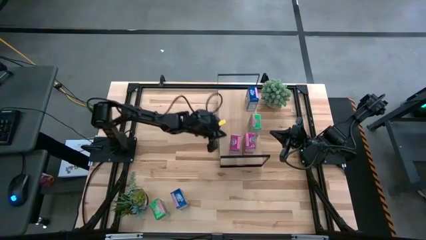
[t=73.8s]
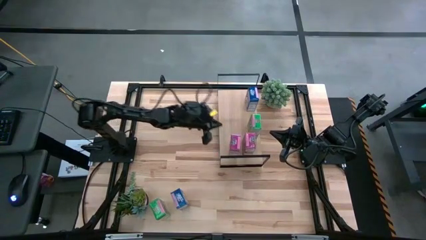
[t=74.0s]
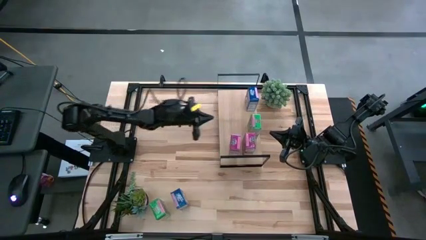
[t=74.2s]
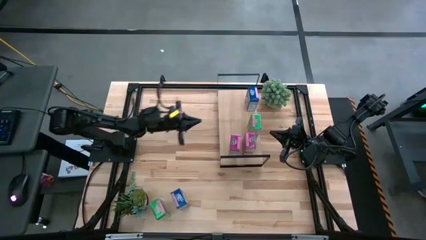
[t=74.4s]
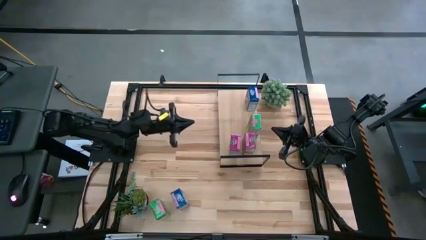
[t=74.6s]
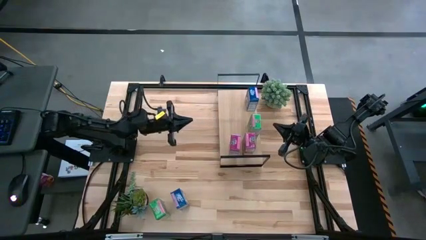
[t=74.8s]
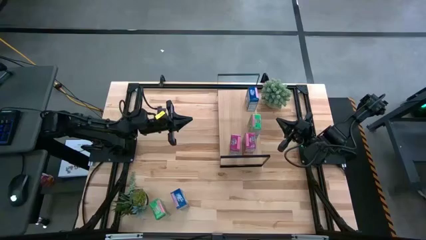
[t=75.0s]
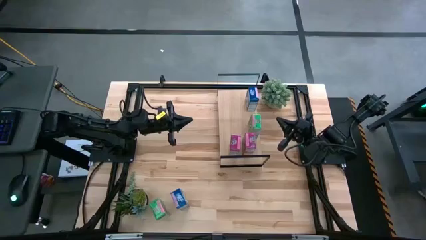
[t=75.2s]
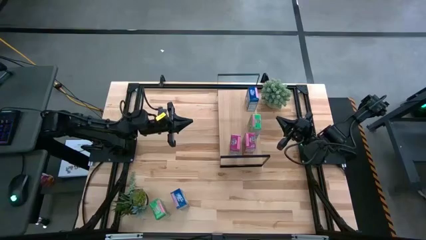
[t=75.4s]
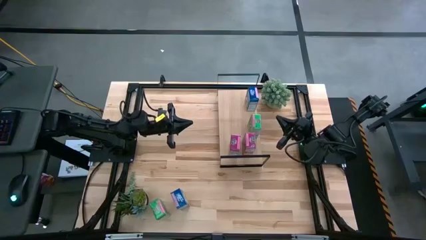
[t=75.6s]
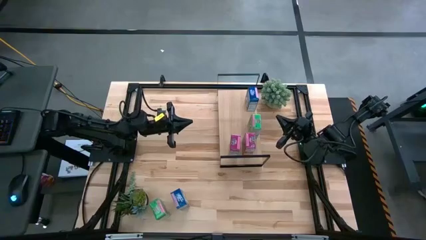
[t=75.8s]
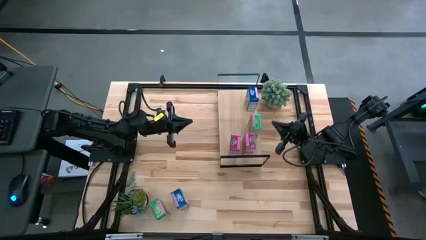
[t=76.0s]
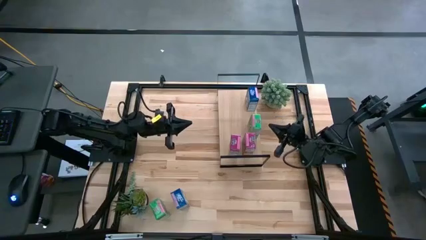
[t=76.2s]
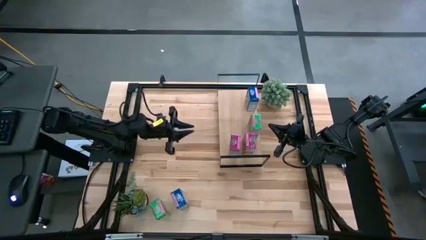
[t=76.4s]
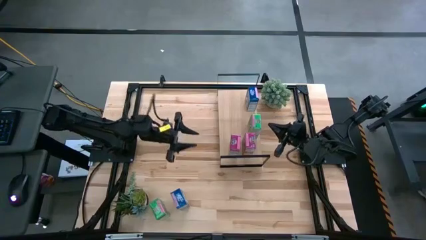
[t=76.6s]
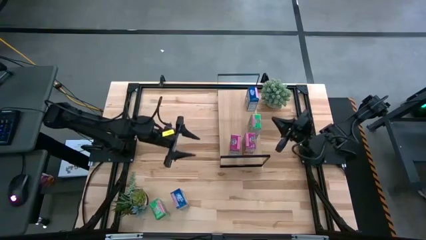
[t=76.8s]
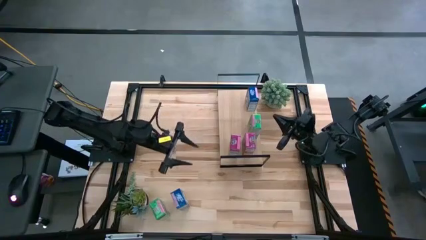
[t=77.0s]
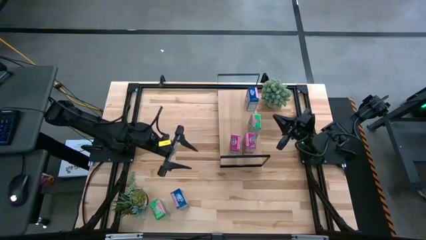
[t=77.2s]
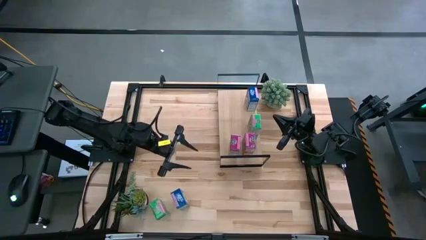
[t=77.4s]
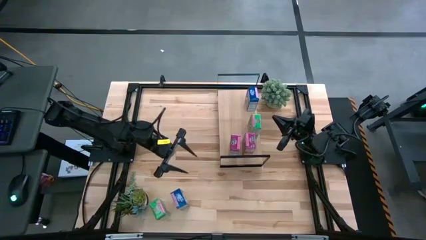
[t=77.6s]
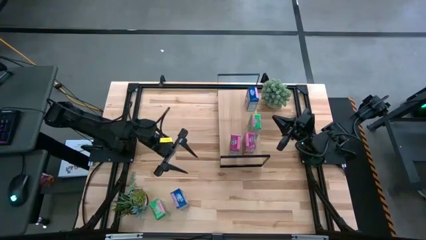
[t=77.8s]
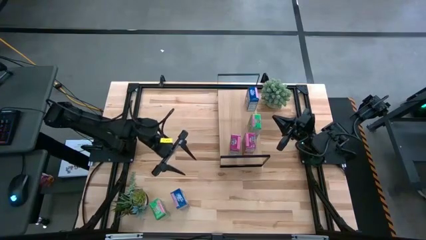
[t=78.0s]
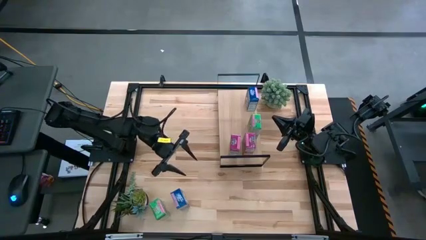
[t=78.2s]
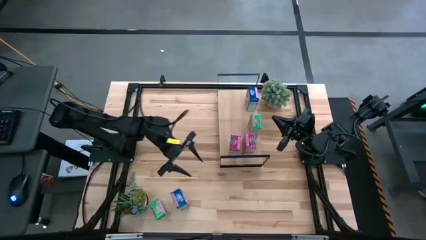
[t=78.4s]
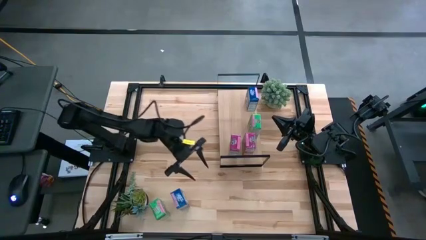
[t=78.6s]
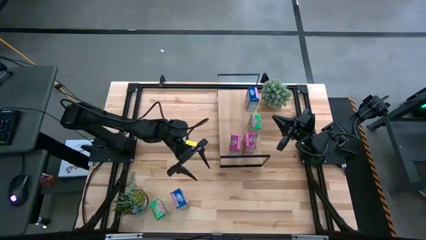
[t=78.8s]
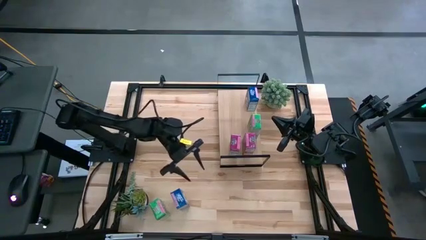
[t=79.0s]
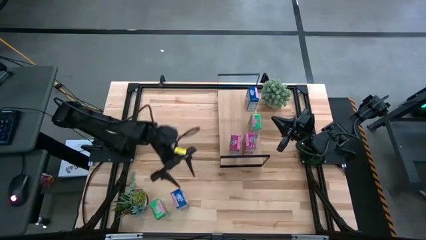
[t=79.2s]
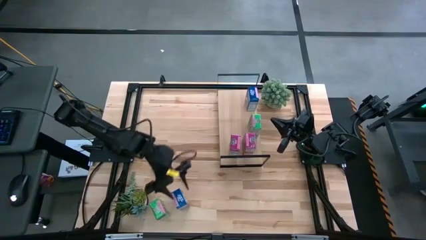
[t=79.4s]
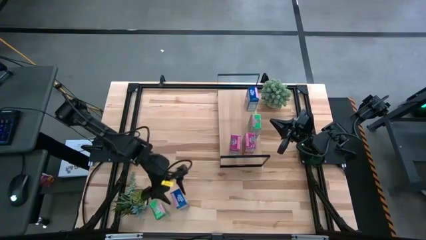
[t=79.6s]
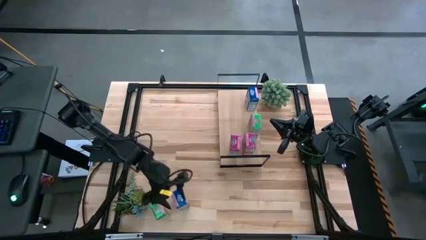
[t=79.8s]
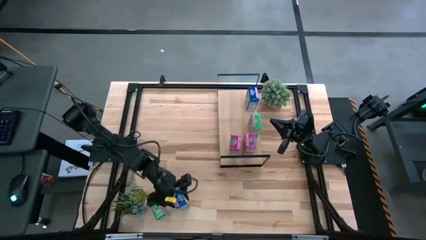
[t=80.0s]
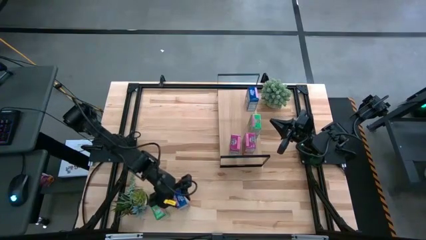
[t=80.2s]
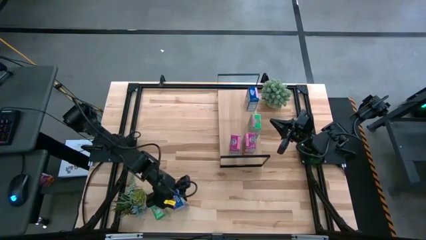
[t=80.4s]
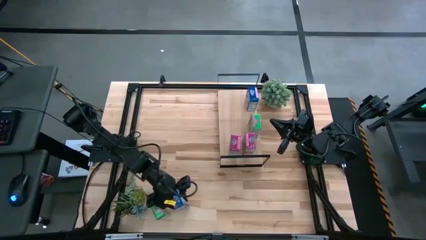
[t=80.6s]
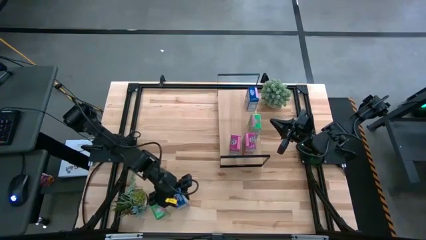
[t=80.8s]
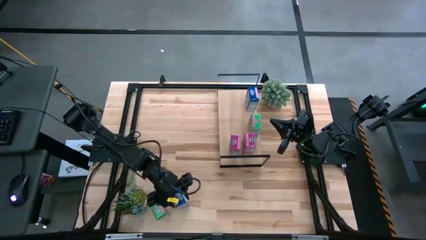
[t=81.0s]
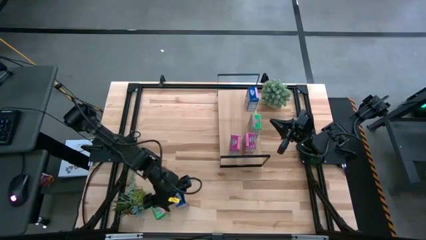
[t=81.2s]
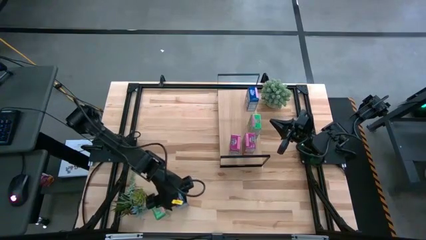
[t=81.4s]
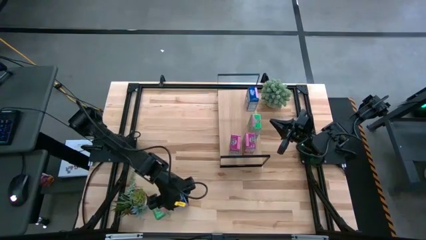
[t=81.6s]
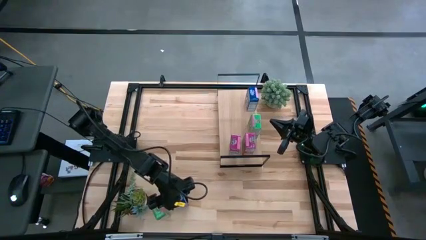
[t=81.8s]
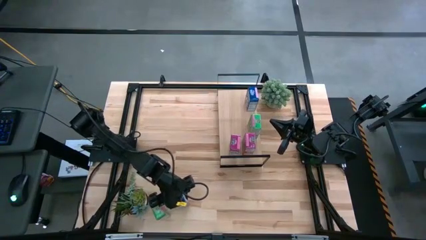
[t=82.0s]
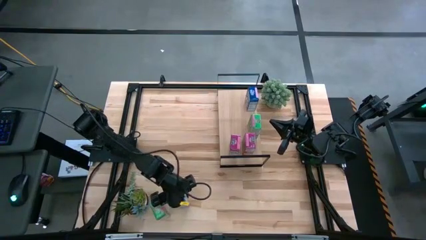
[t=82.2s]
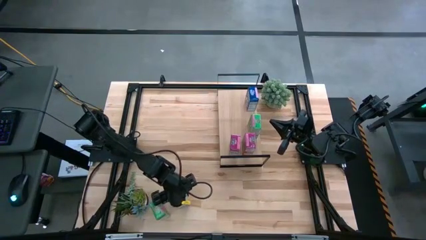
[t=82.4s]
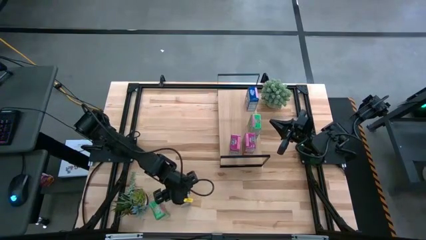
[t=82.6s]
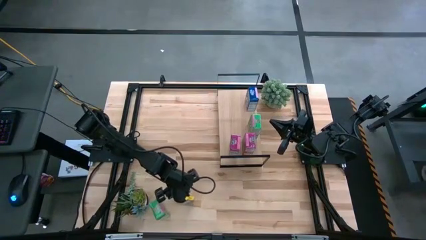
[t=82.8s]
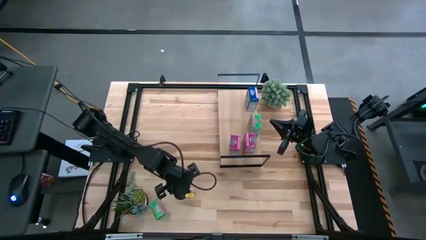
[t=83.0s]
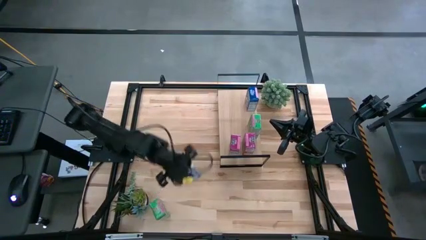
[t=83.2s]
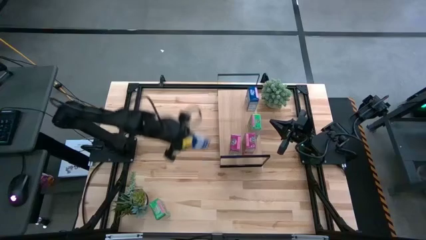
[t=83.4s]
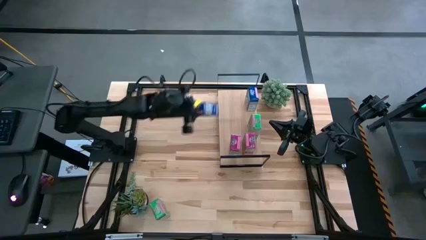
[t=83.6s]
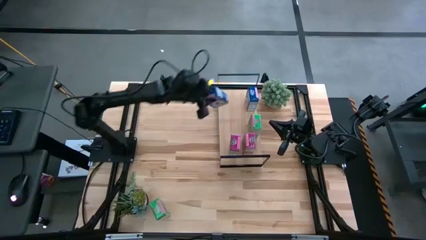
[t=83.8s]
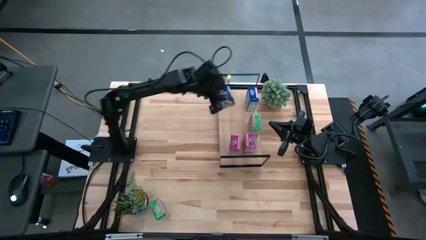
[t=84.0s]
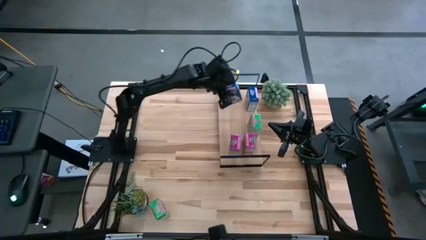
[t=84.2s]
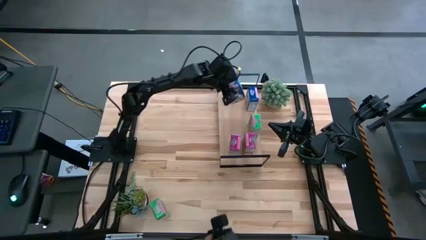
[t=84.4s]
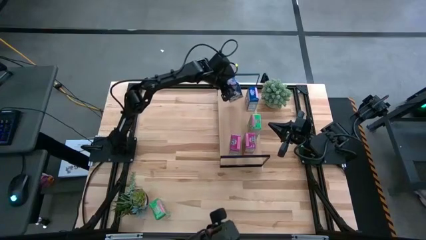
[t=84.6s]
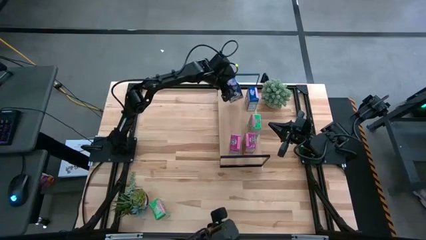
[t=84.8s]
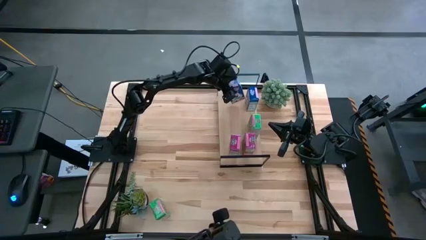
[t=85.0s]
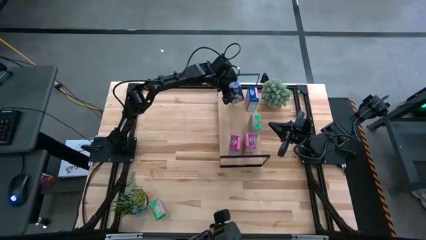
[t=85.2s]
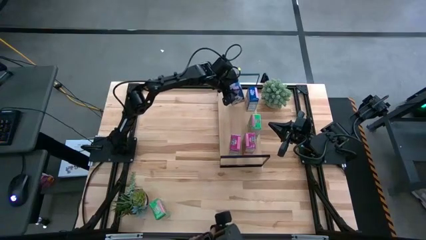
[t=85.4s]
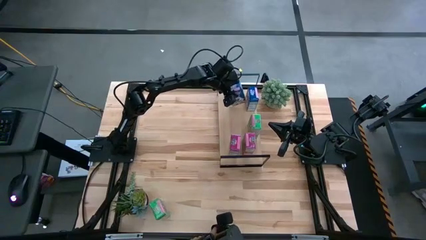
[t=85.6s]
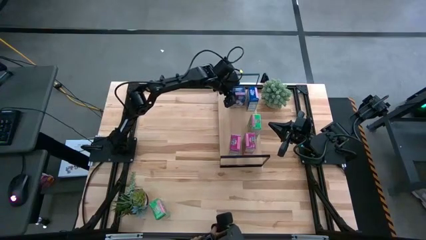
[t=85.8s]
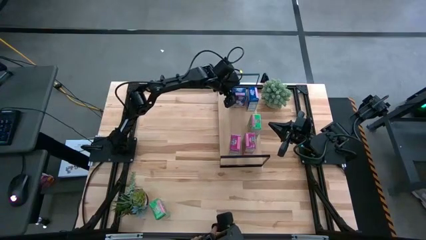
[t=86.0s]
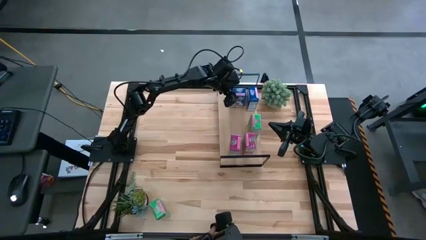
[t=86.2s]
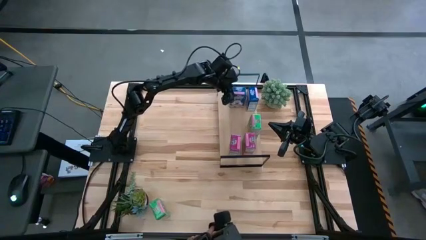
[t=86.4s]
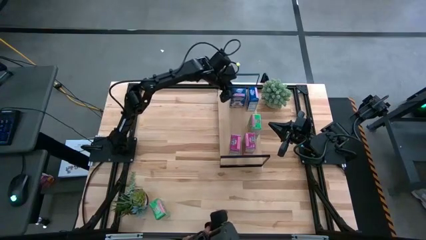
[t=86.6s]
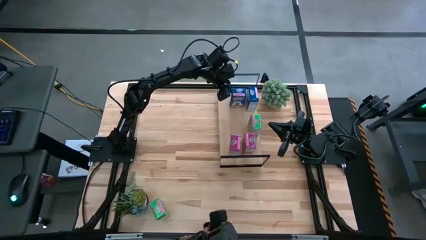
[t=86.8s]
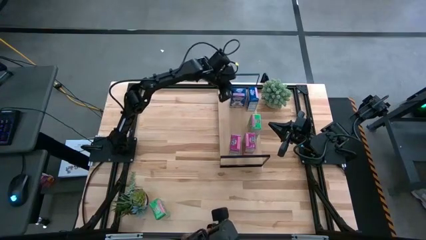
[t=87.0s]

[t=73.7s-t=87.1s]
Task: Stack cereal on shelf
Put the blue cereal box on the shelf aligned with the other blue cereal box

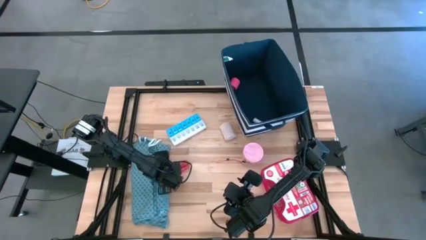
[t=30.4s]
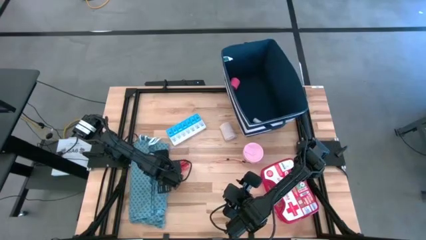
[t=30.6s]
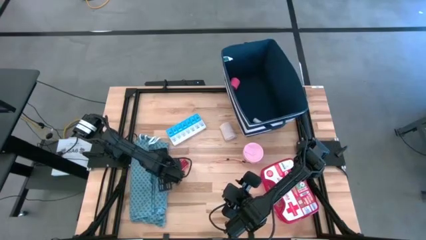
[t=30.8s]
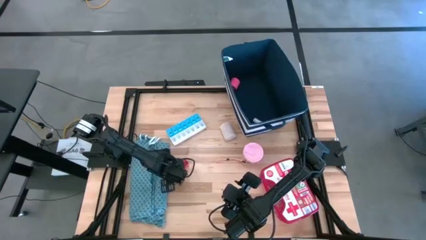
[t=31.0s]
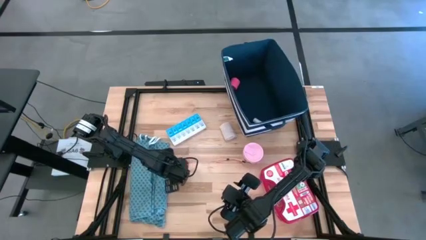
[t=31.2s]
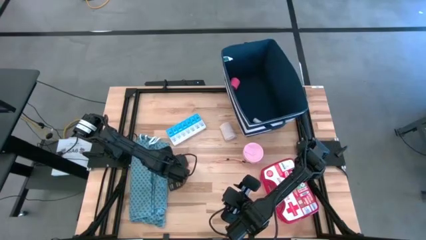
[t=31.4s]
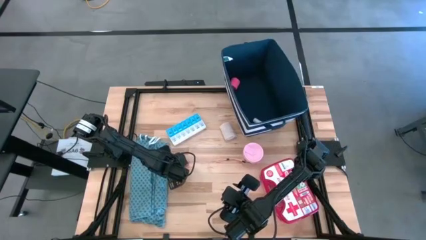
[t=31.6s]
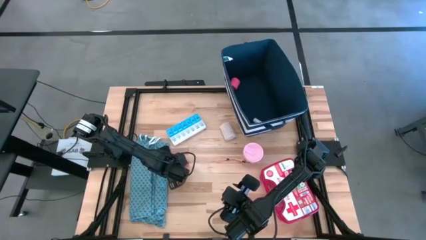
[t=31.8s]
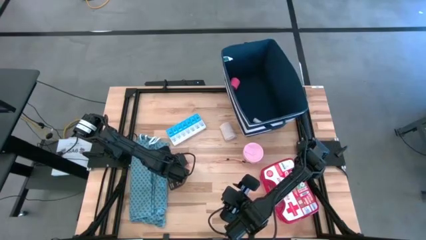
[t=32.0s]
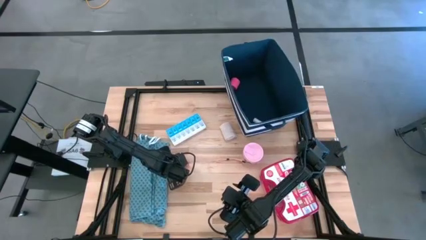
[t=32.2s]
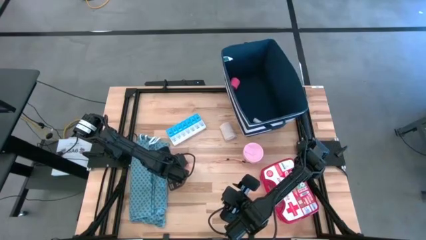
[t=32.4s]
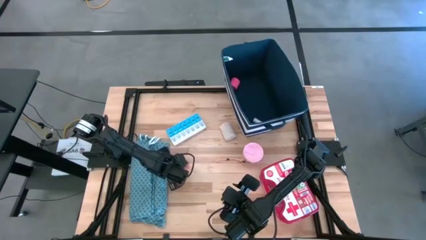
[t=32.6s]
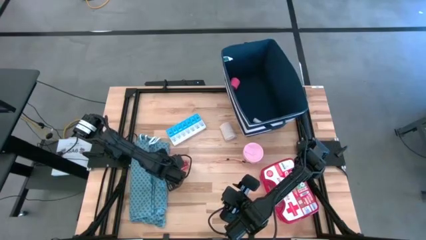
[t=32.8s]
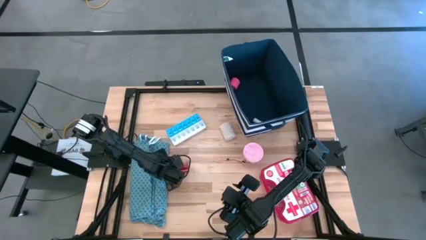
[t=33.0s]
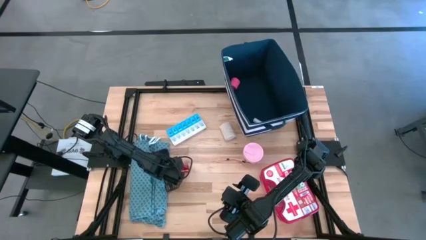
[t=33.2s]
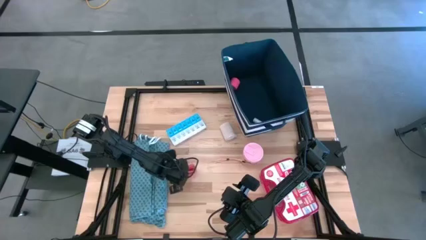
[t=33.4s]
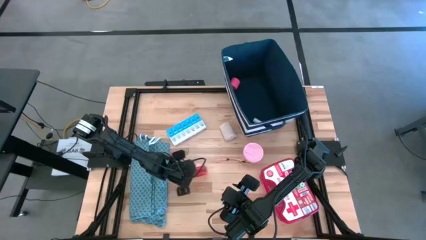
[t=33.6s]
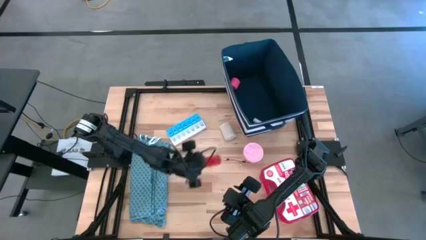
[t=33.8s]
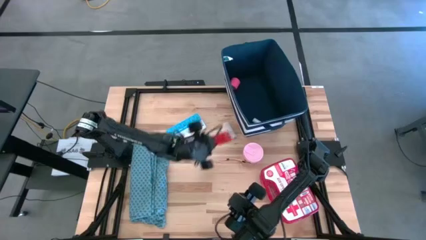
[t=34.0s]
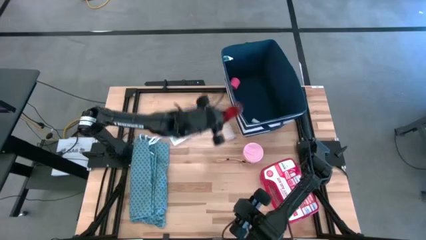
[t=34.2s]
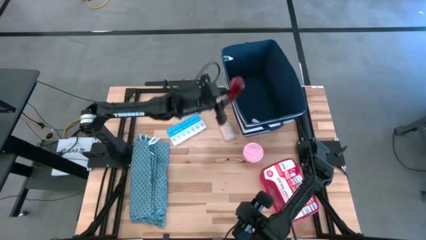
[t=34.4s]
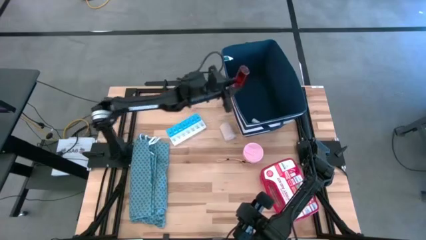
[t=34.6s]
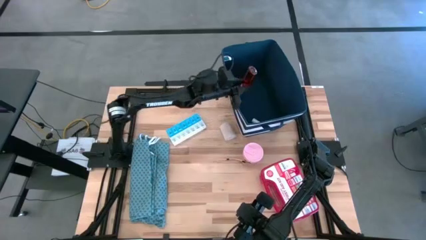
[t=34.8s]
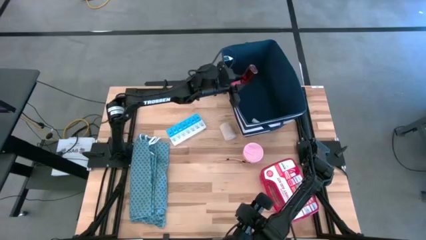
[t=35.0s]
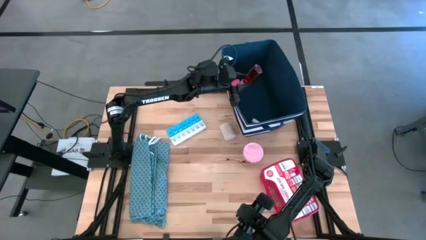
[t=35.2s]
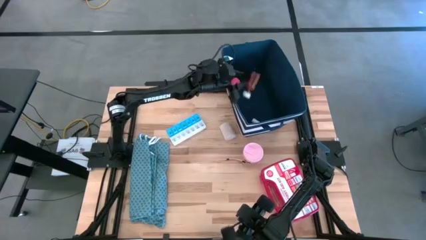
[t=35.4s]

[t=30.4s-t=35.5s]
Task: Pick & place medical supplies in basket/bin
Put the red medicine bottle into the blue bin
